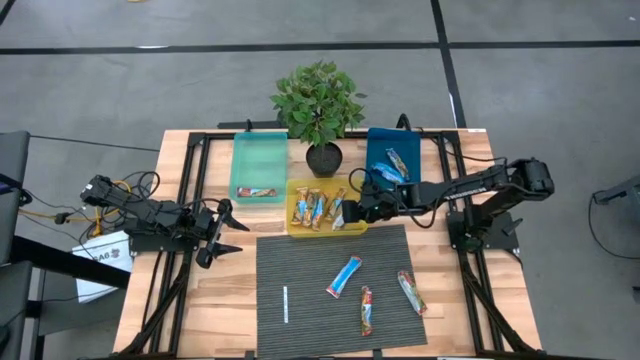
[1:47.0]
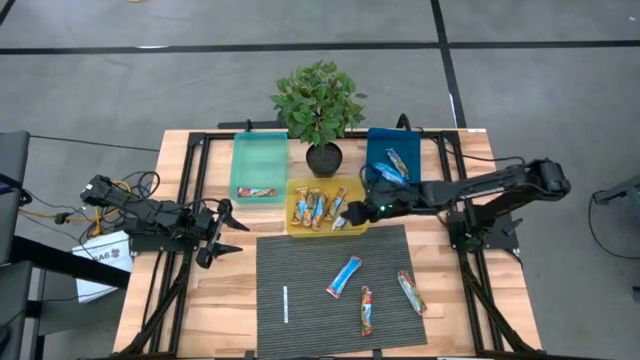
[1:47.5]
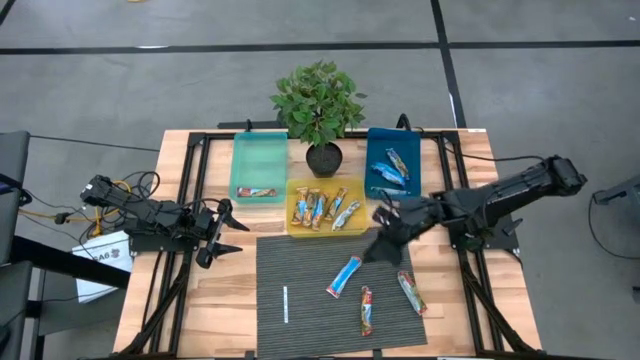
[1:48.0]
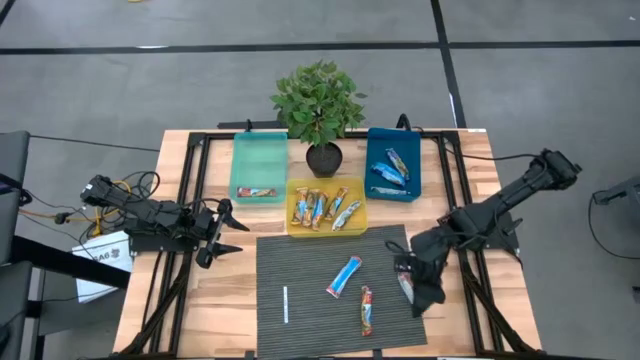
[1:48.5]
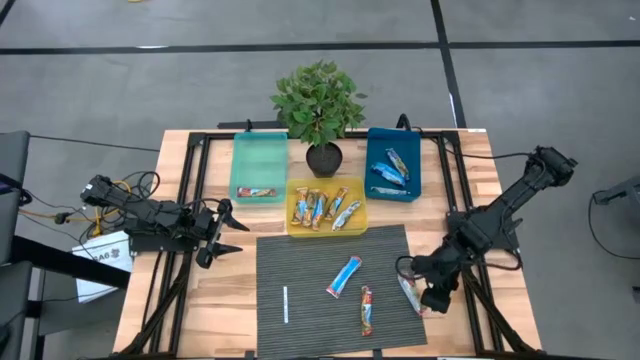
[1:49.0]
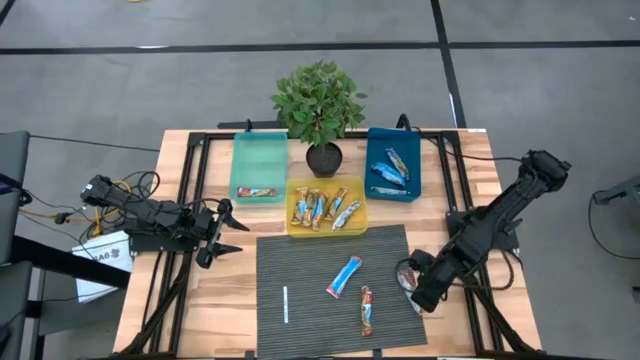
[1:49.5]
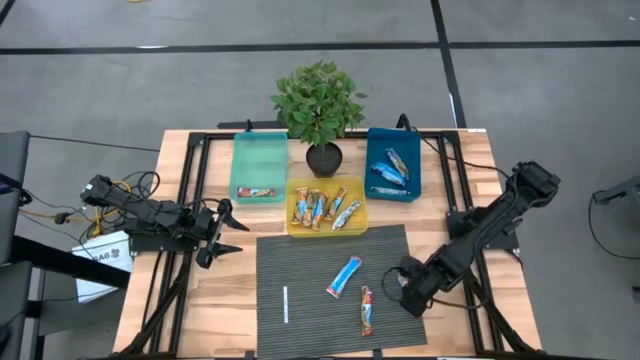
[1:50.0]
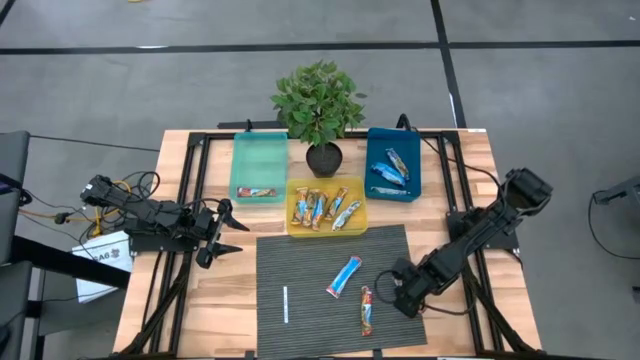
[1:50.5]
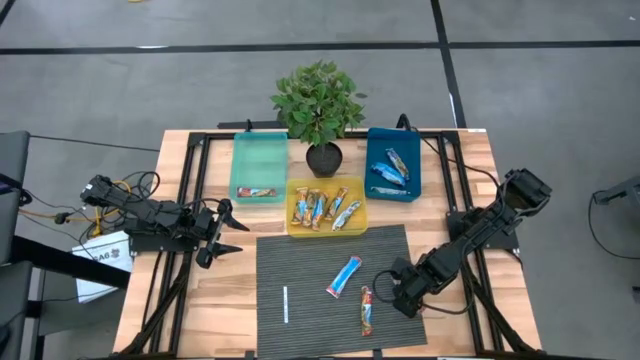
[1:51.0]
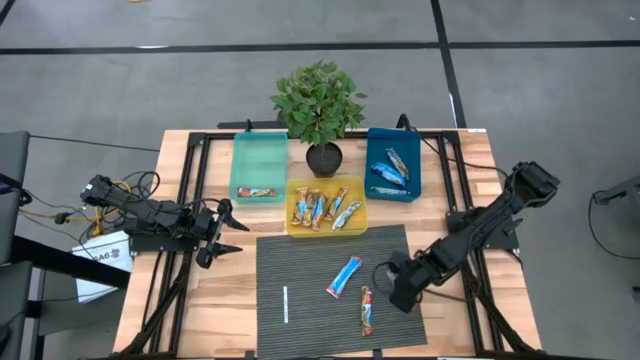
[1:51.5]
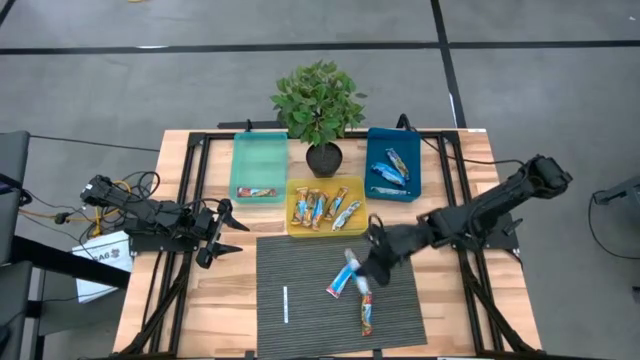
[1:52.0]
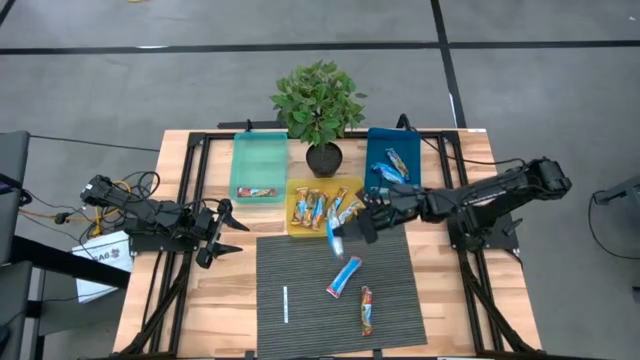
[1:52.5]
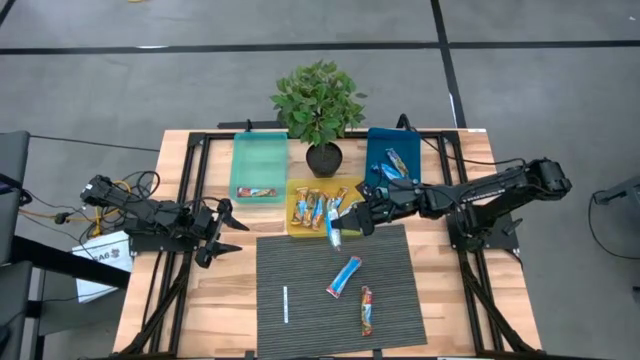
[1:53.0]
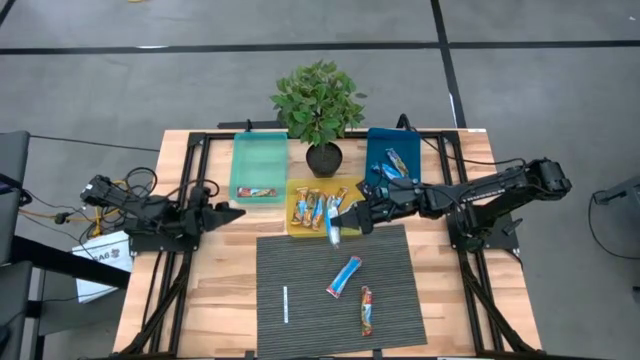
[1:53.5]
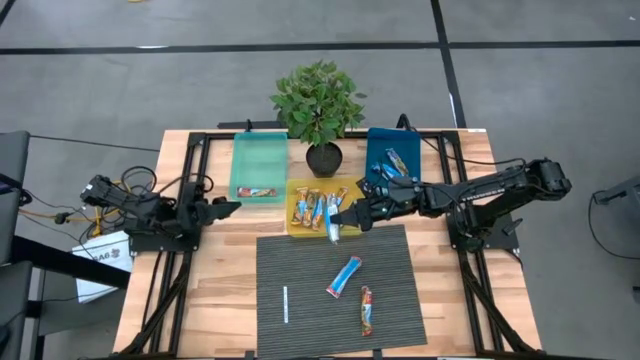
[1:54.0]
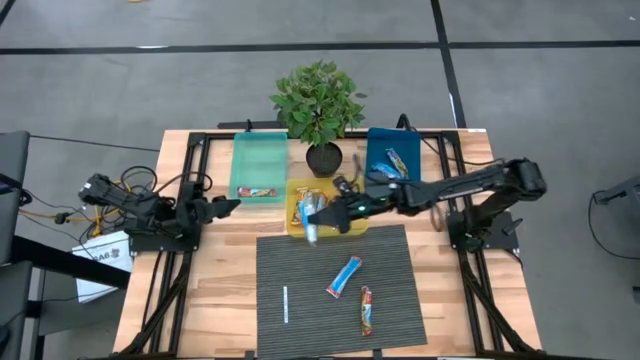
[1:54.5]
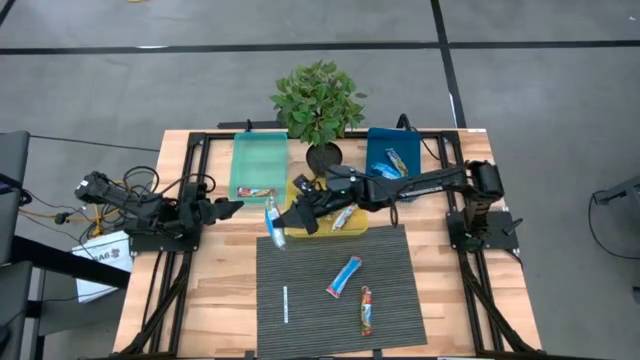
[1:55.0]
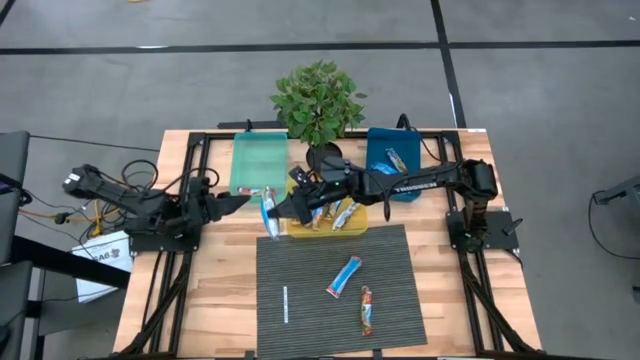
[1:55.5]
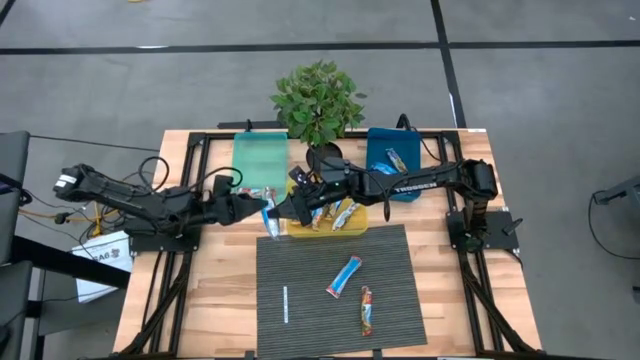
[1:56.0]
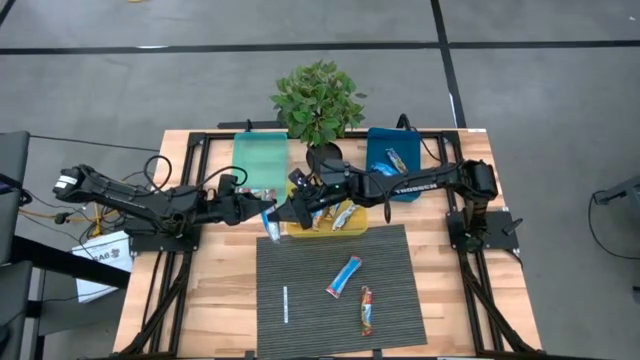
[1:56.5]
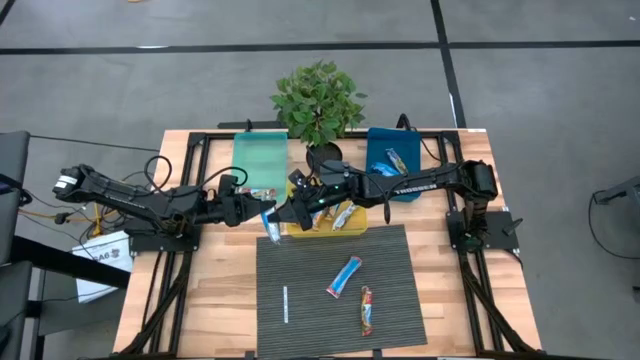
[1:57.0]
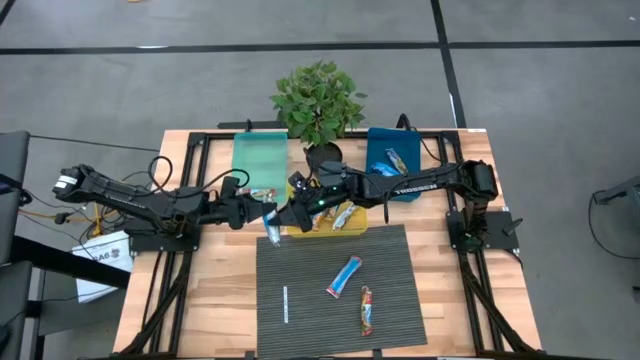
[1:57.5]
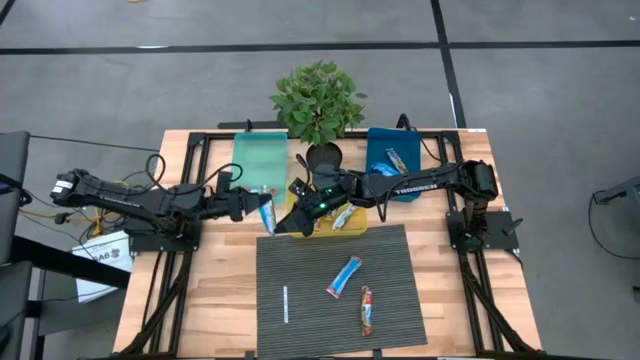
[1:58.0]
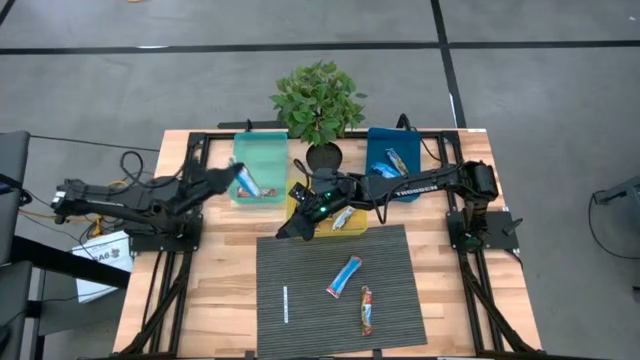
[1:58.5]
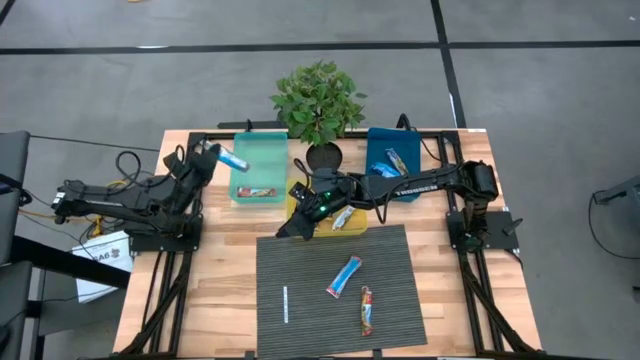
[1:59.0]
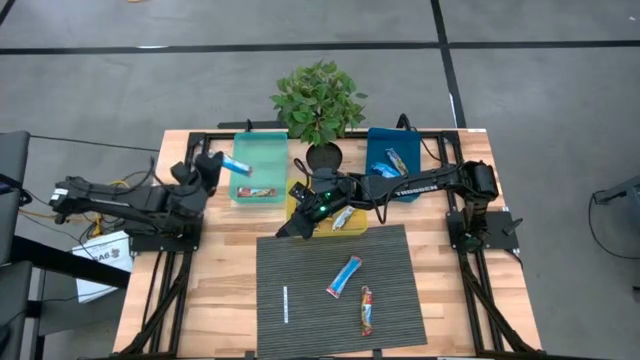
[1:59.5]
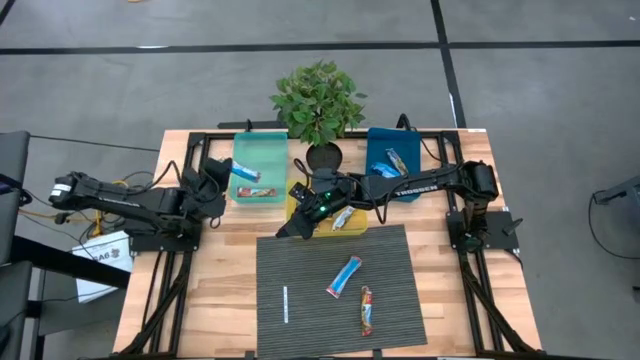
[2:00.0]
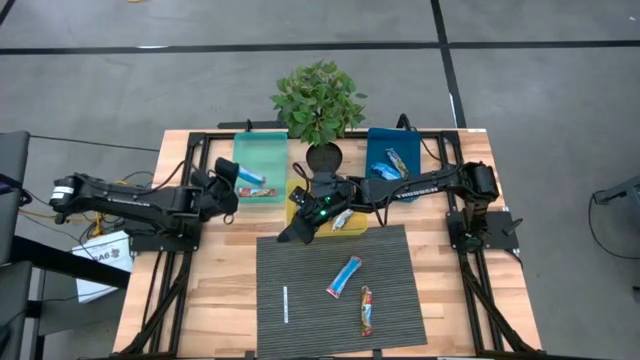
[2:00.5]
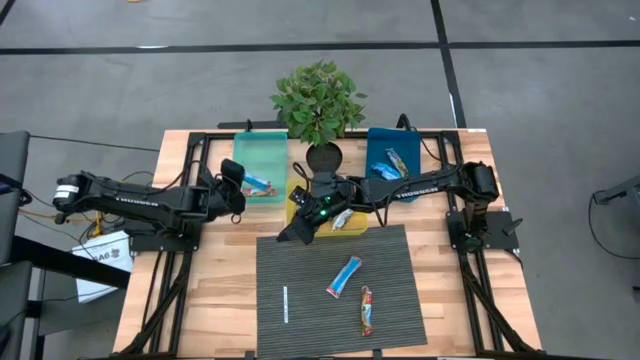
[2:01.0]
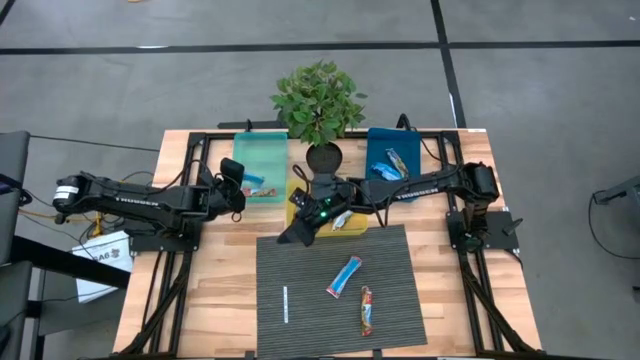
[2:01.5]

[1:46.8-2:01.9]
Task: Pick and place Granola Bars by type
Put the red granola bar into the green bin

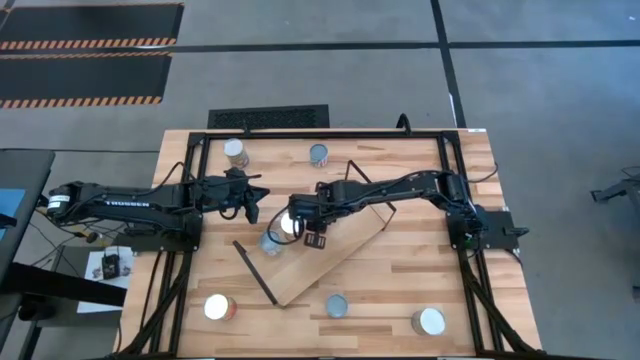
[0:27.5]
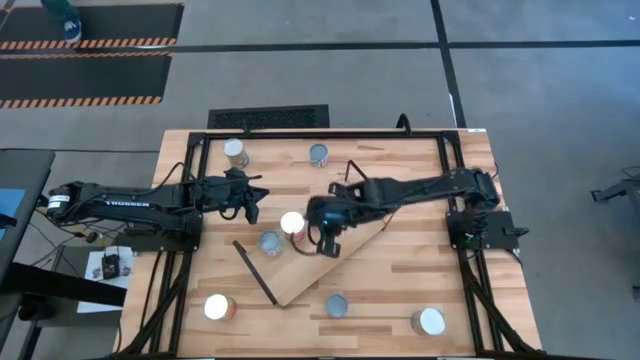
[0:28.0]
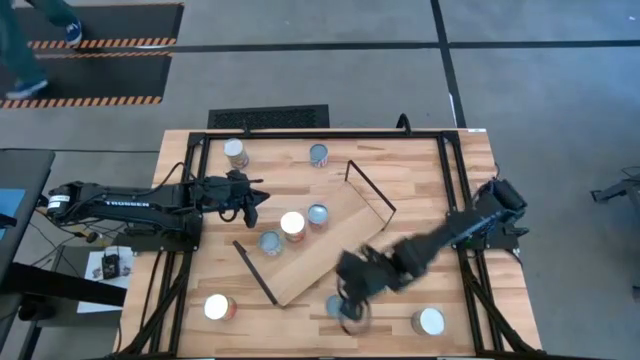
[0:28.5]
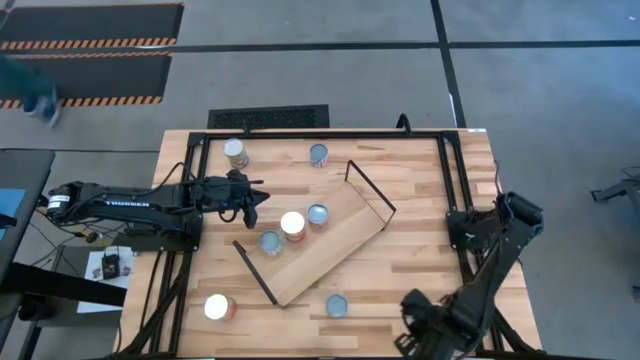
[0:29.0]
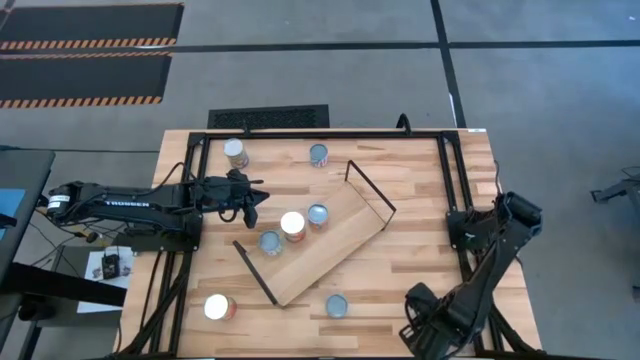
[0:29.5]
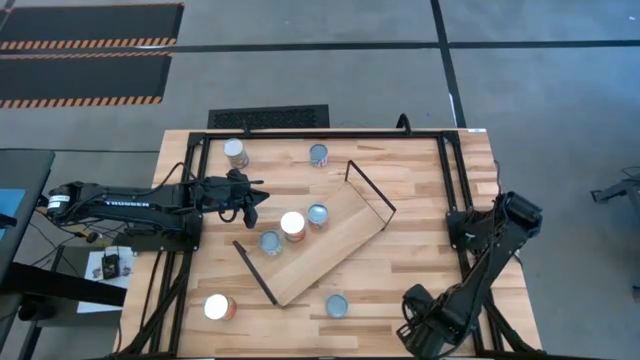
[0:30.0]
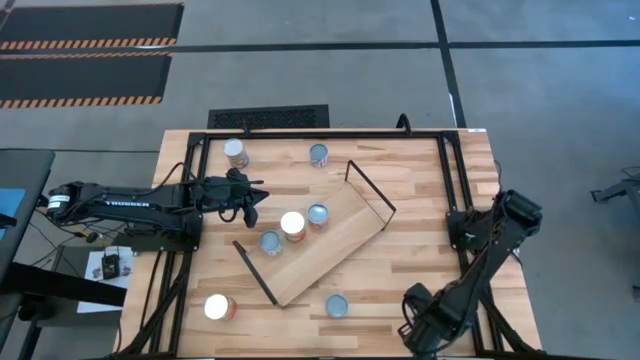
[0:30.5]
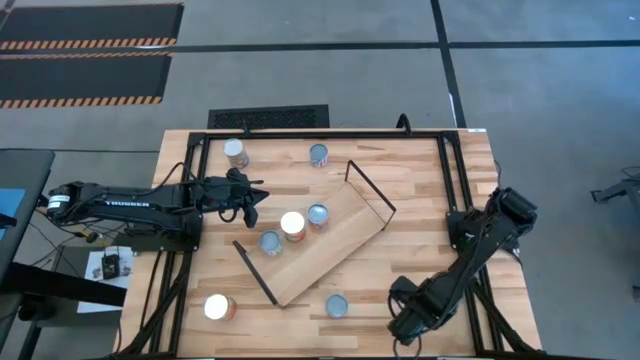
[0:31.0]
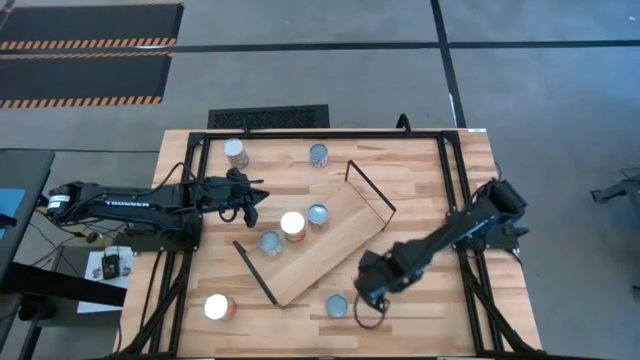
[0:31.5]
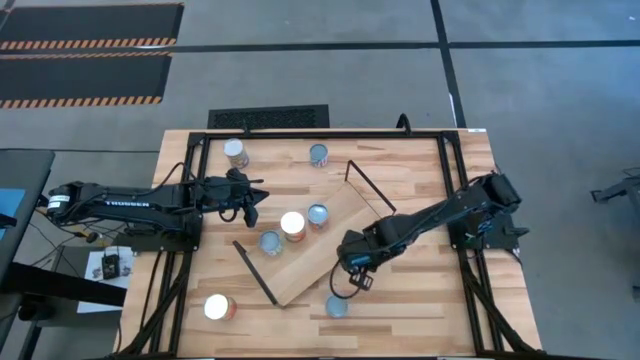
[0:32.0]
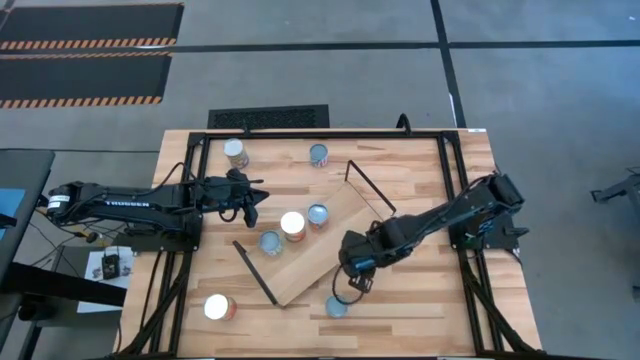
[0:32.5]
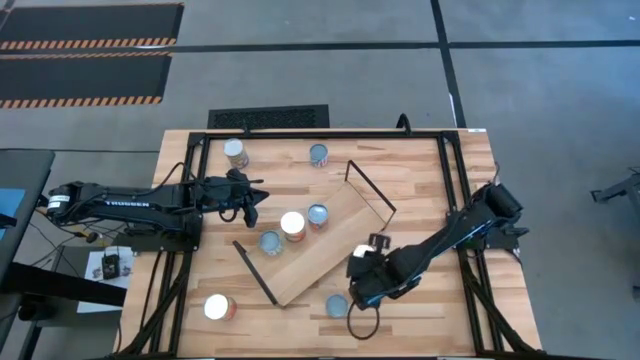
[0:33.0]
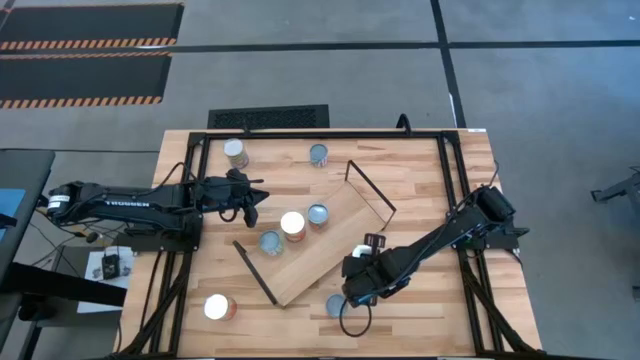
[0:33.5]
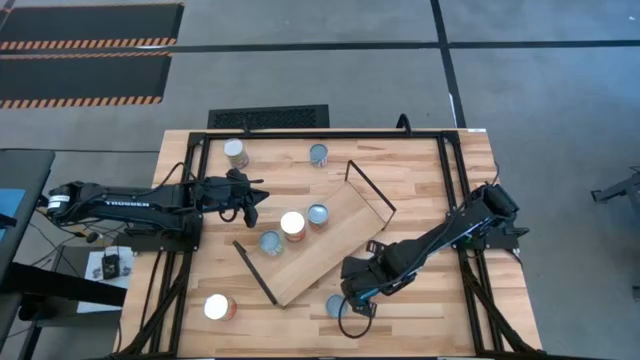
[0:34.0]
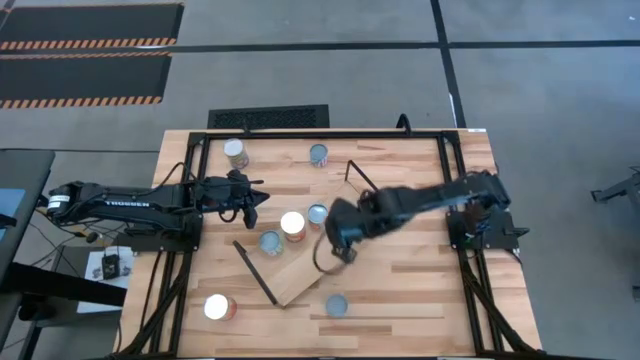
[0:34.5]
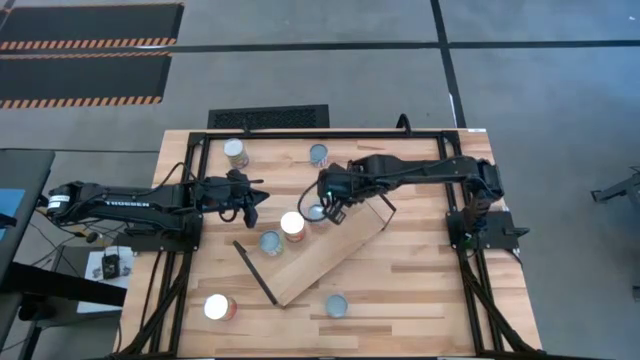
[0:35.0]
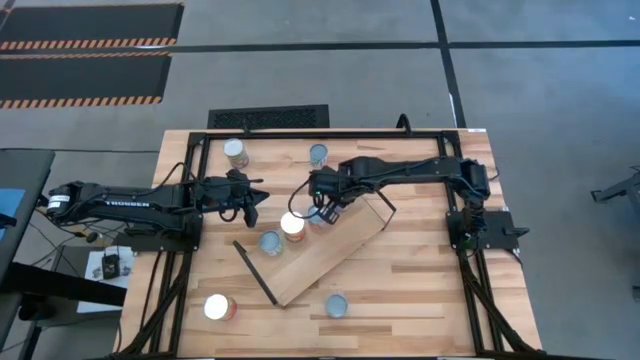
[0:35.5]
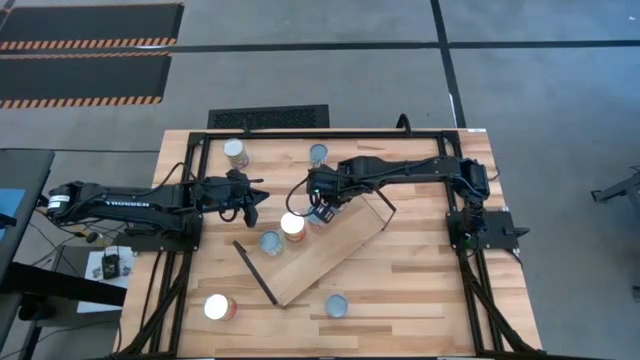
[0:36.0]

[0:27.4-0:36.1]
Task: Pick and place cans onto a shelf
Put the bottom canned peaches on the shelf
